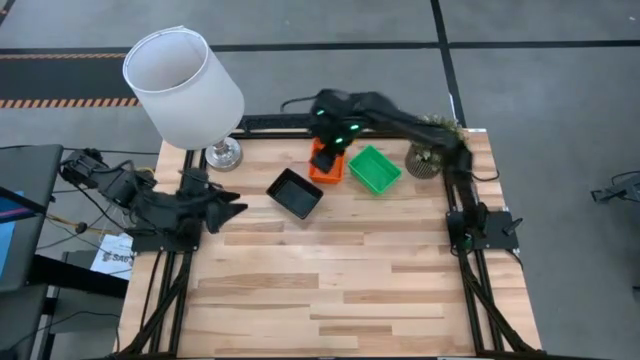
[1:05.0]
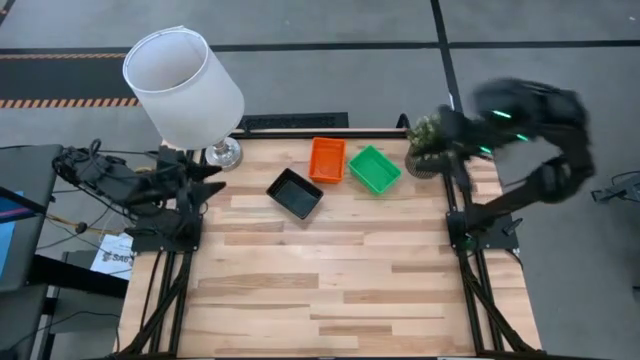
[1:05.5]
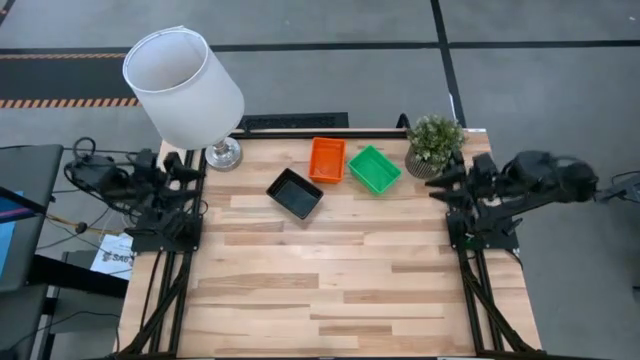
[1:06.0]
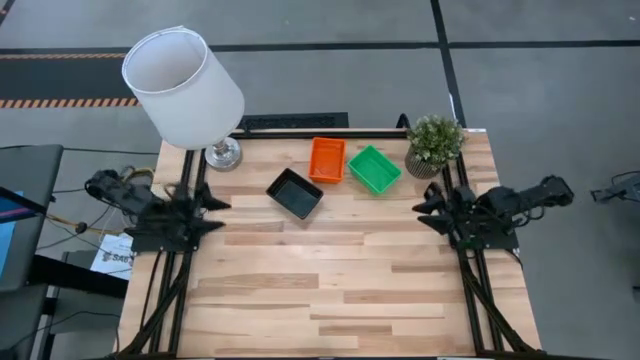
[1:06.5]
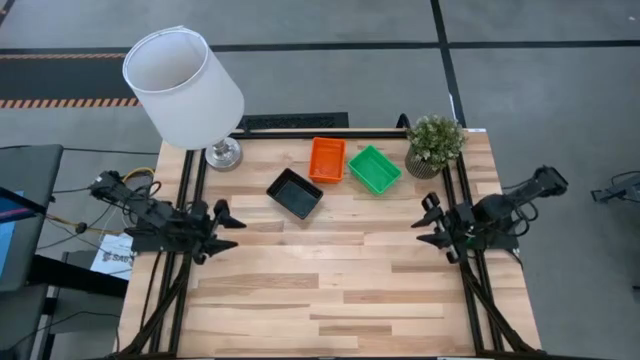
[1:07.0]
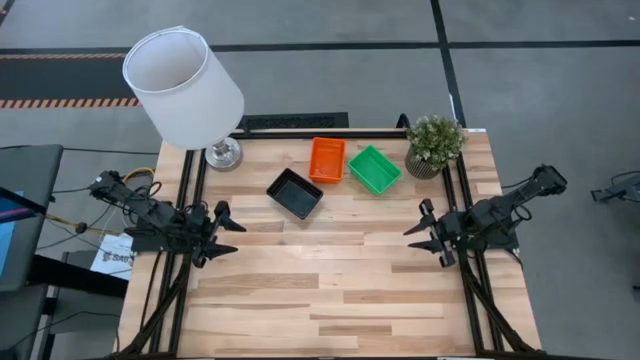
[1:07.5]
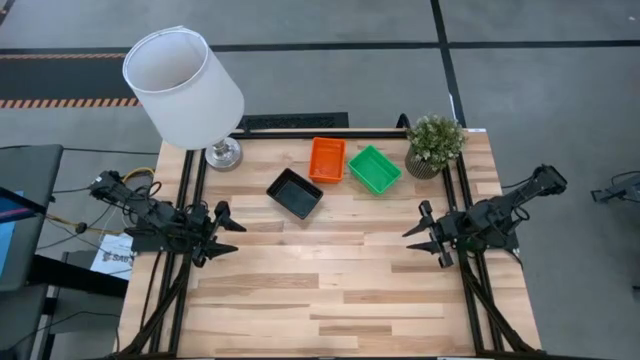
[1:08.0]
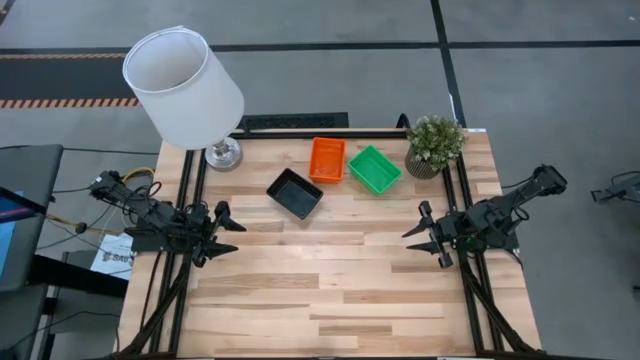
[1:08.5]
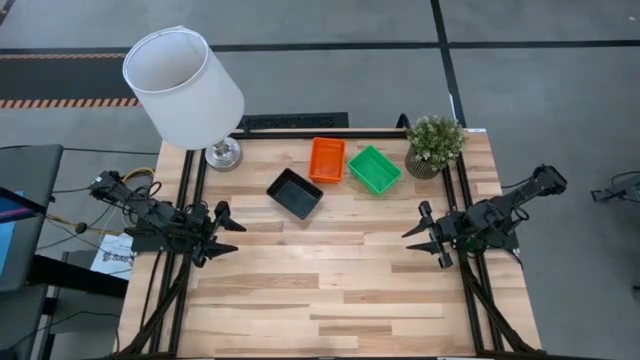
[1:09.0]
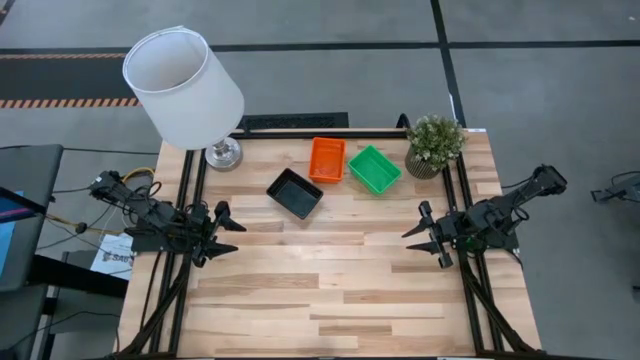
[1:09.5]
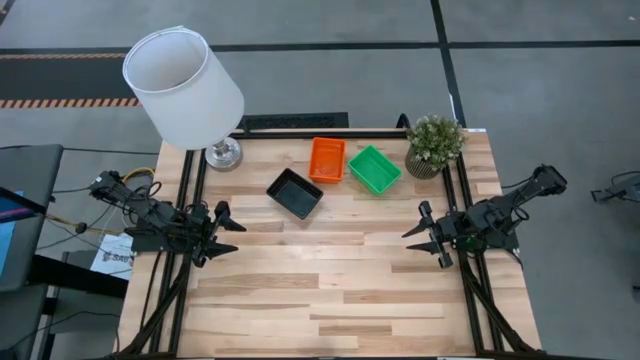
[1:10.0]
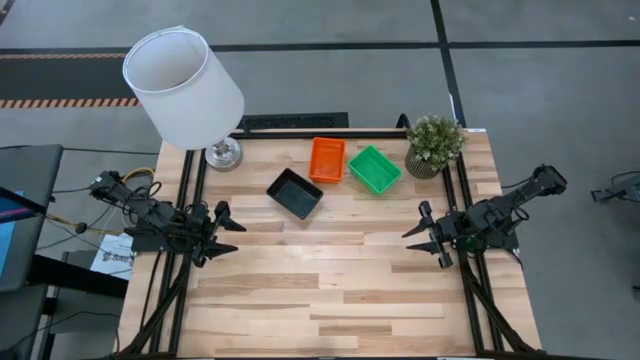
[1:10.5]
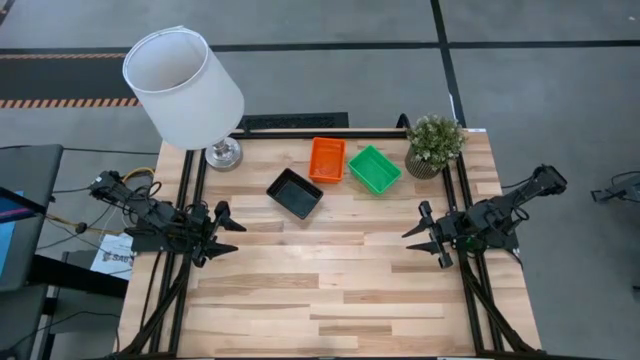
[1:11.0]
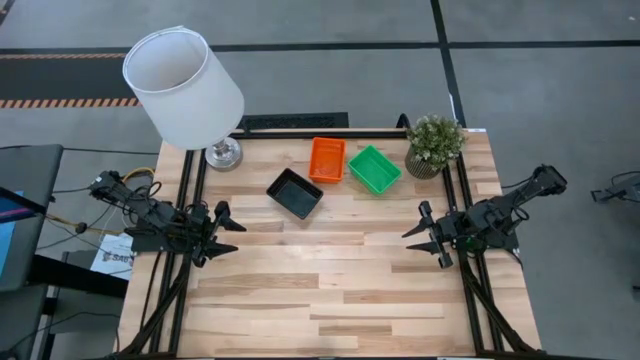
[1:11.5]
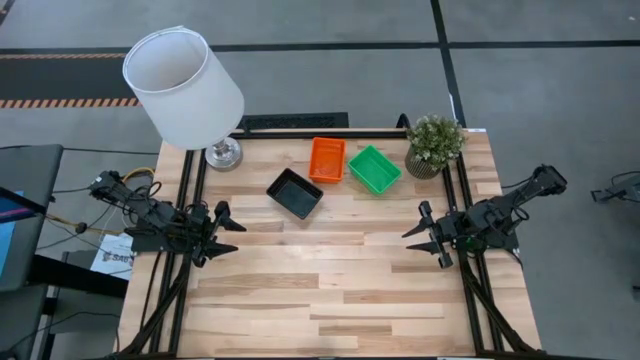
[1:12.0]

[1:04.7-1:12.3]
Return to Home Position

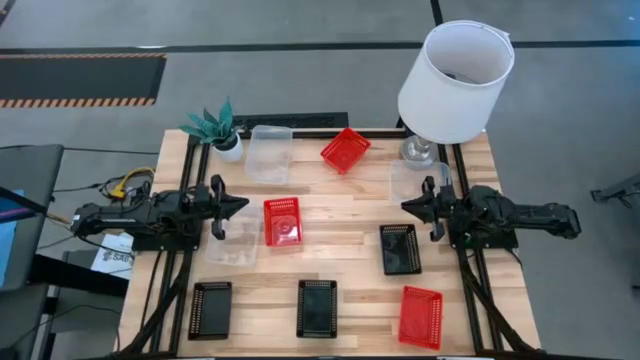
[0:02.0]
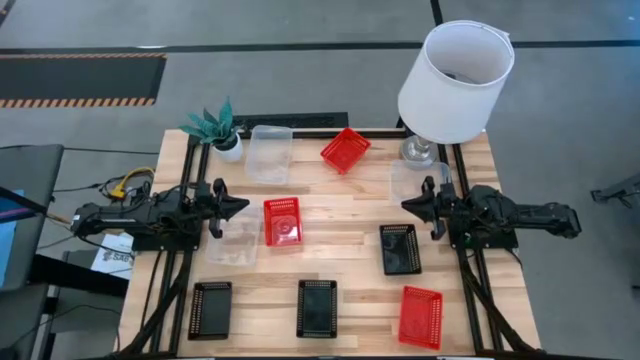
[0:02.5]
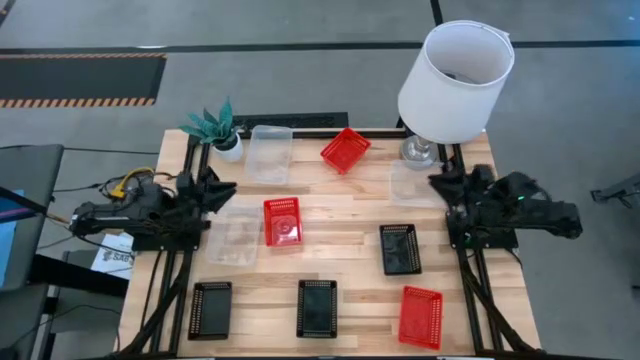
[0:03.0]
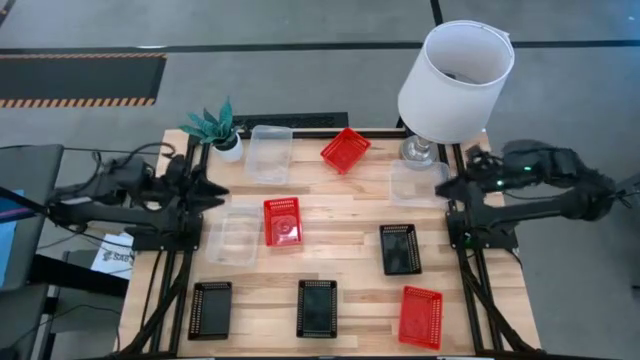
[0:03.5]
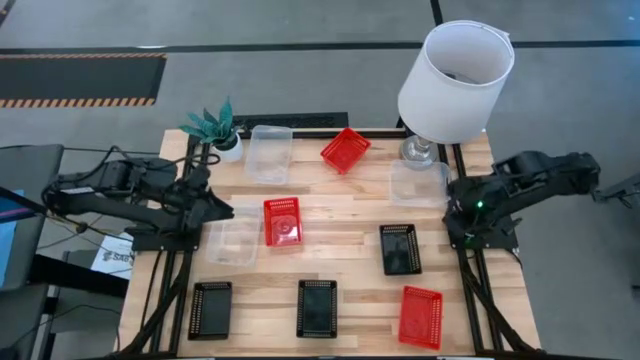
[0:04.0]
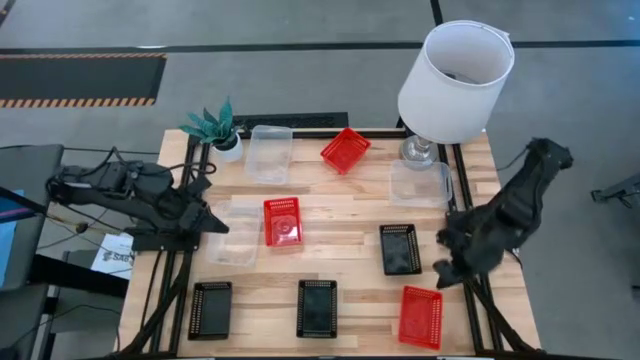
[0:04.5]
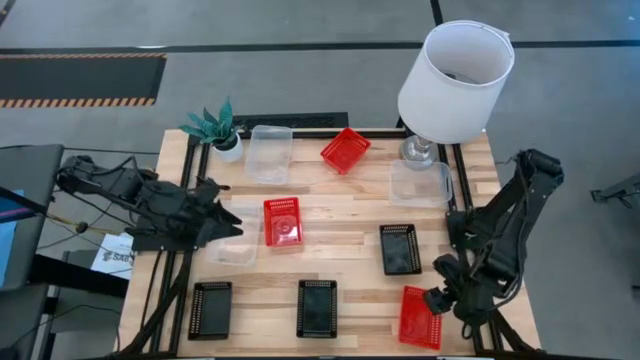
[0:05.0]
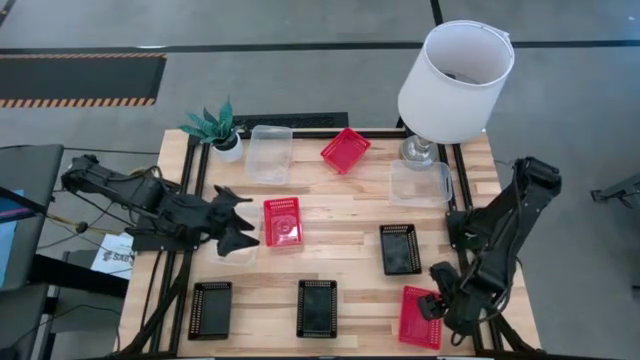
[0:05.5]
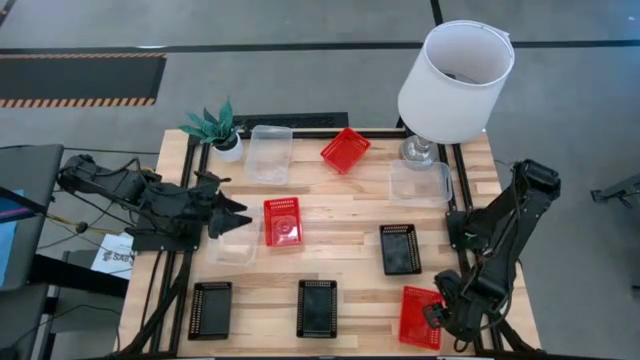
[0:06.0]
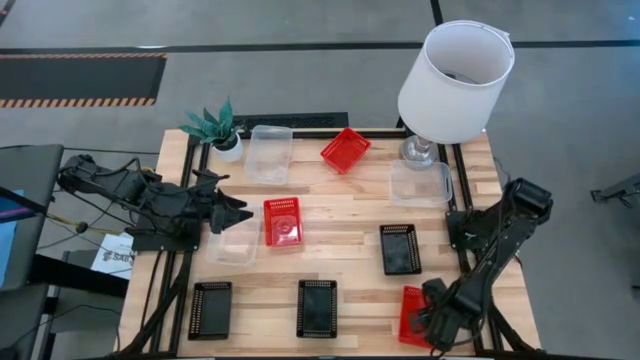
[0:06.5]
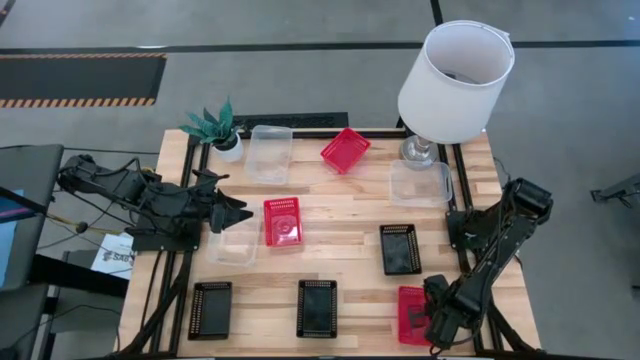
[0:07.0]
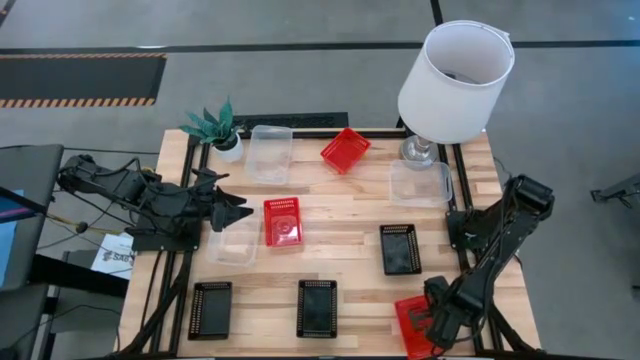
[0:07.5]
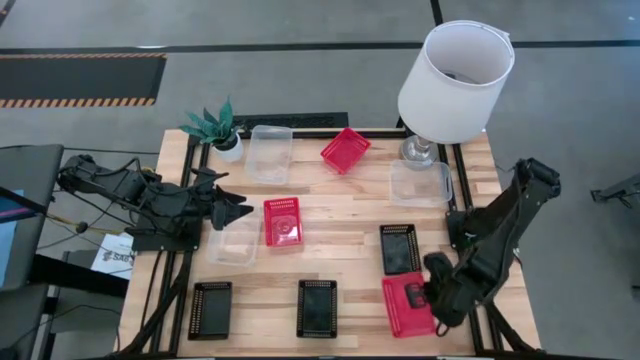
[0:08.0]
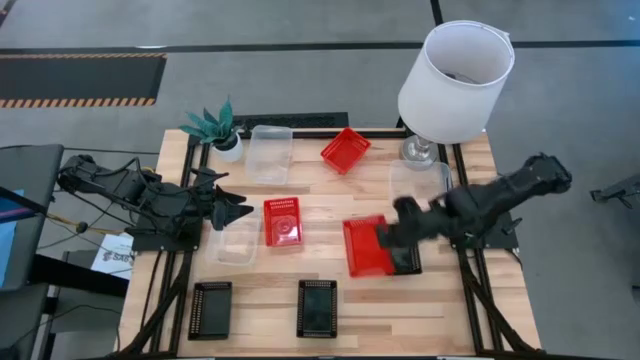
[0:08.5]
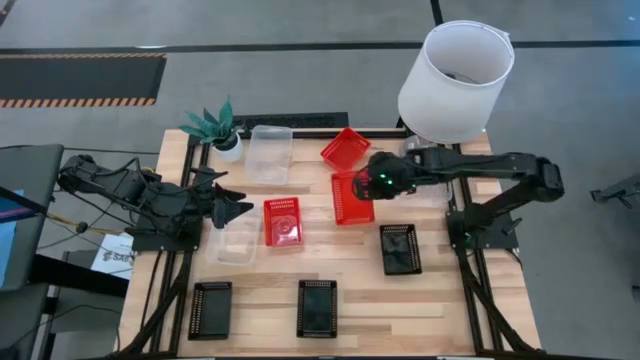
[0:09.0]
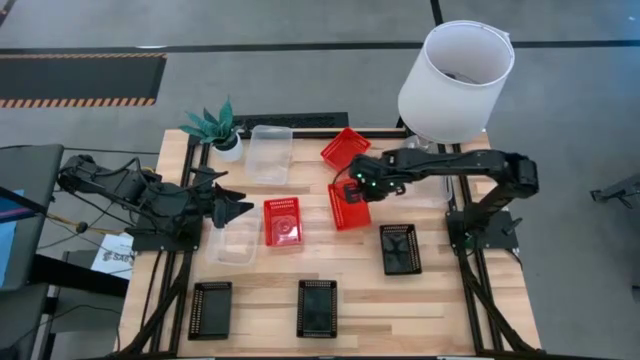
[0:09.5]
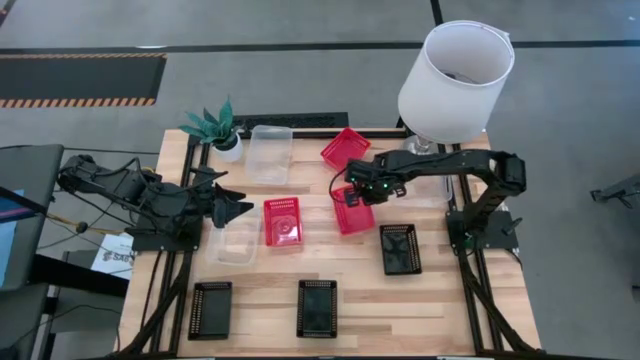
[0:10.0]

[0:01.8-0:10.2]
Move the bottom red bin to the center of the table
